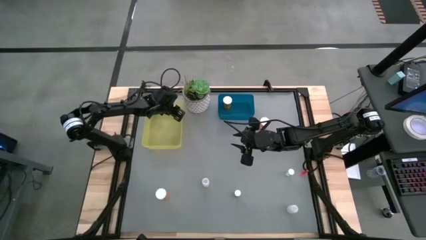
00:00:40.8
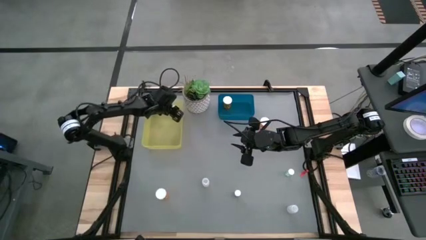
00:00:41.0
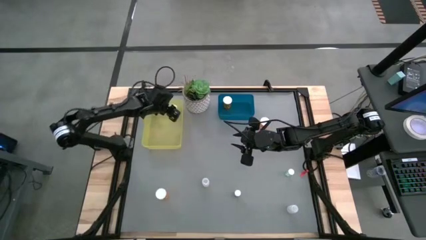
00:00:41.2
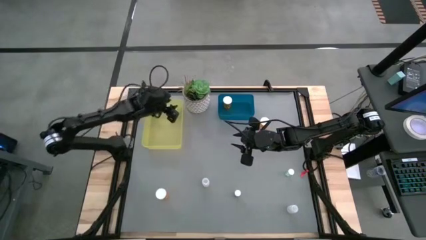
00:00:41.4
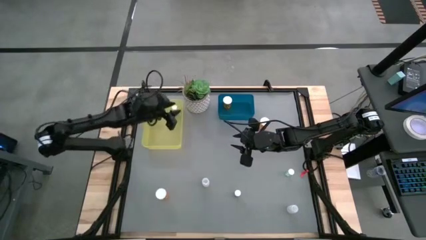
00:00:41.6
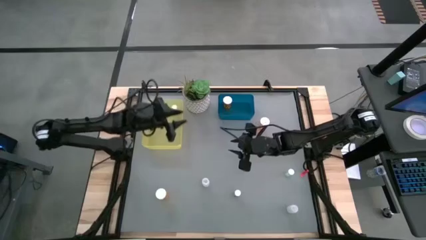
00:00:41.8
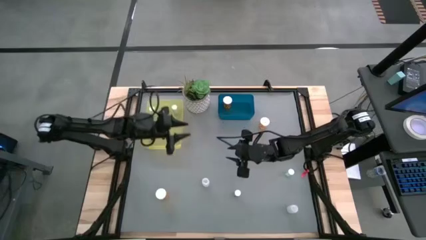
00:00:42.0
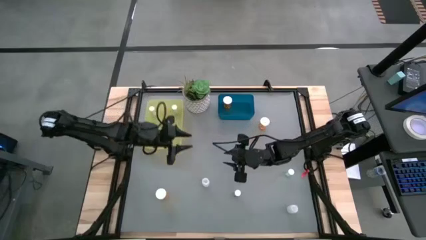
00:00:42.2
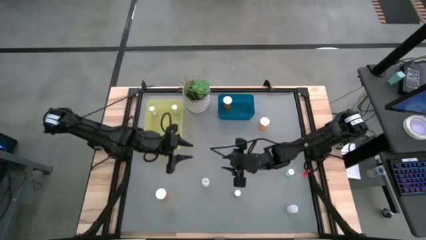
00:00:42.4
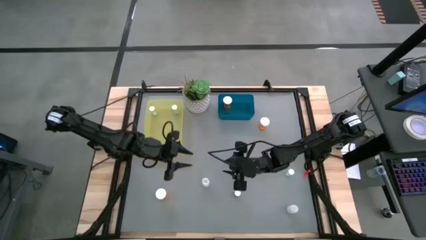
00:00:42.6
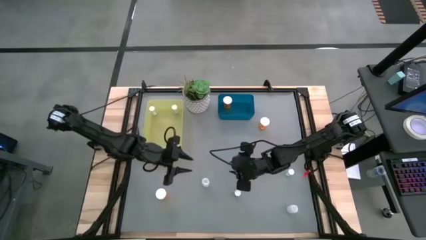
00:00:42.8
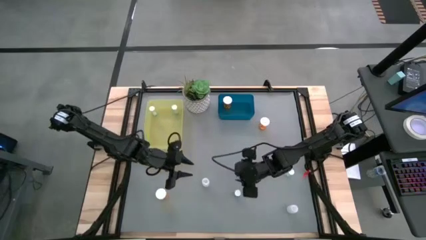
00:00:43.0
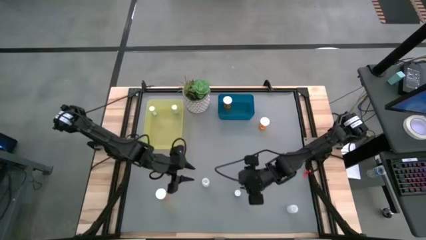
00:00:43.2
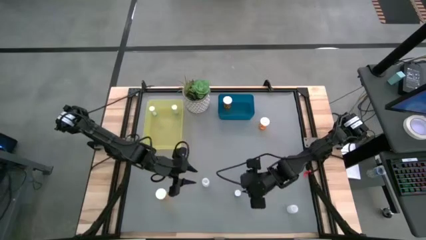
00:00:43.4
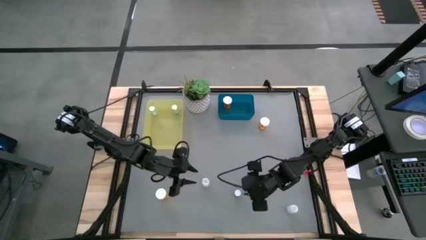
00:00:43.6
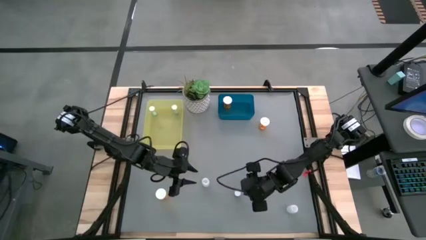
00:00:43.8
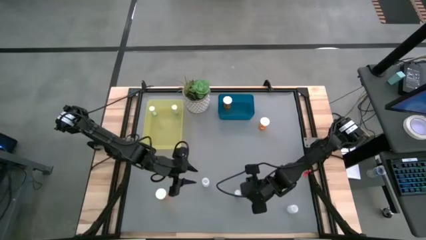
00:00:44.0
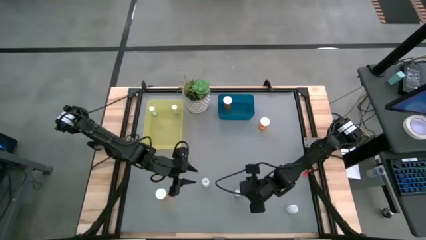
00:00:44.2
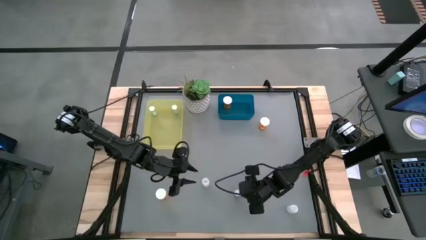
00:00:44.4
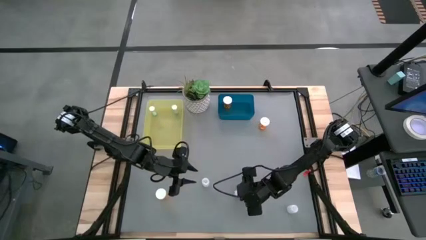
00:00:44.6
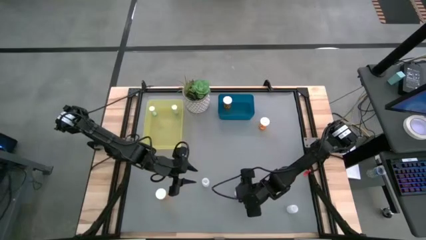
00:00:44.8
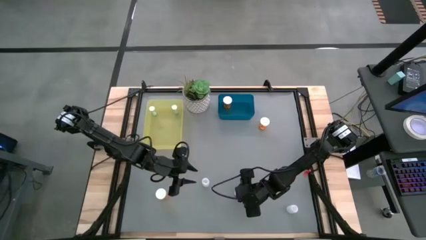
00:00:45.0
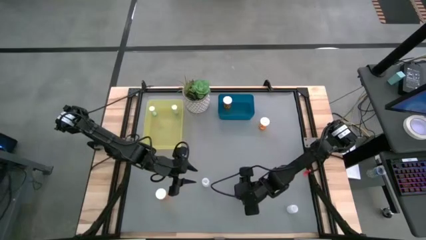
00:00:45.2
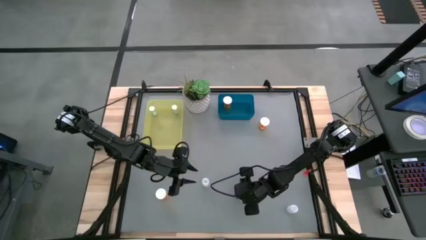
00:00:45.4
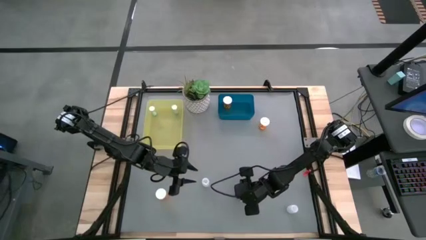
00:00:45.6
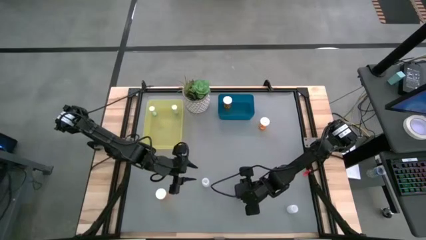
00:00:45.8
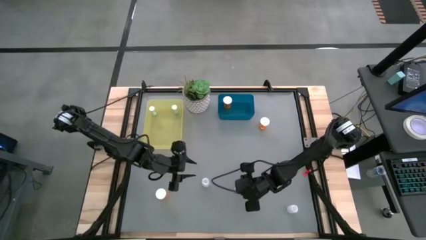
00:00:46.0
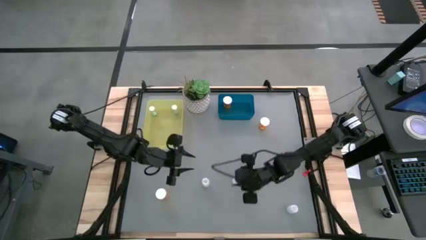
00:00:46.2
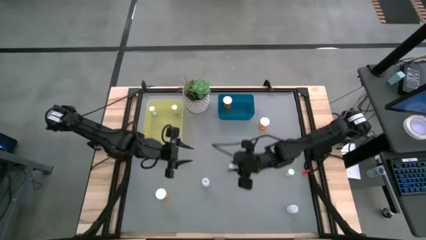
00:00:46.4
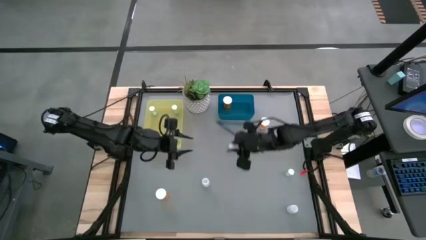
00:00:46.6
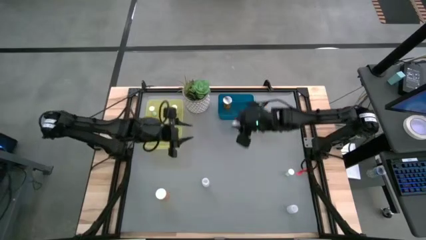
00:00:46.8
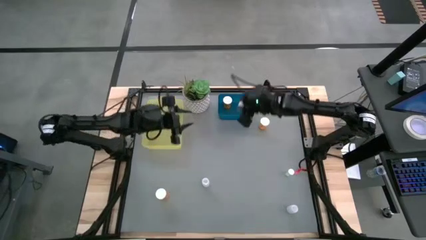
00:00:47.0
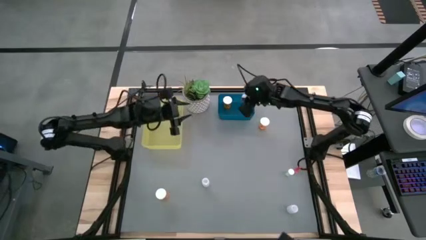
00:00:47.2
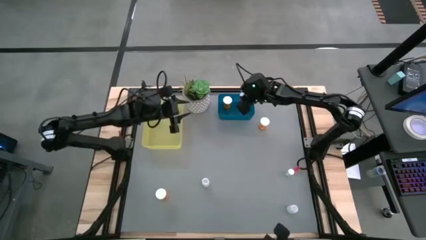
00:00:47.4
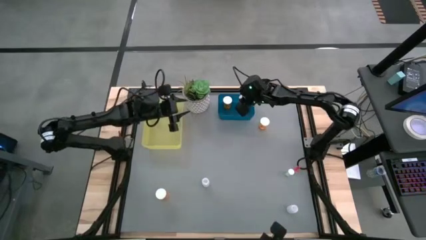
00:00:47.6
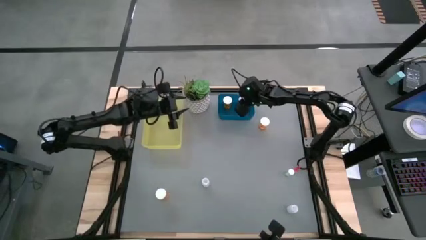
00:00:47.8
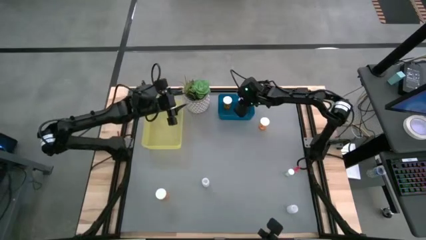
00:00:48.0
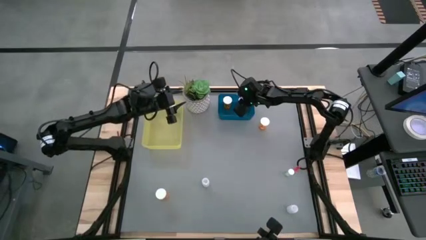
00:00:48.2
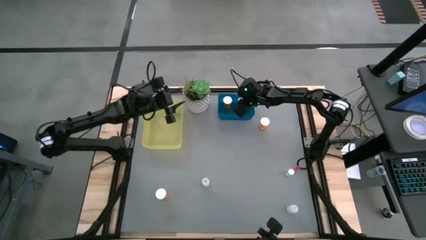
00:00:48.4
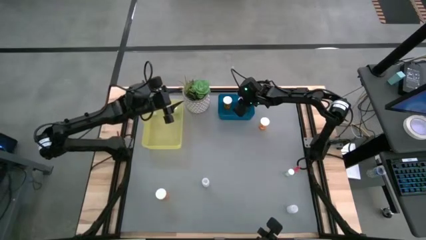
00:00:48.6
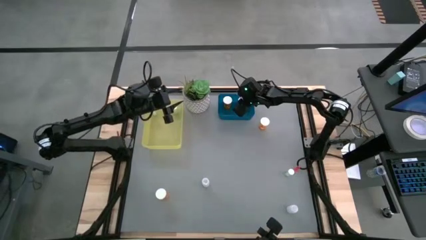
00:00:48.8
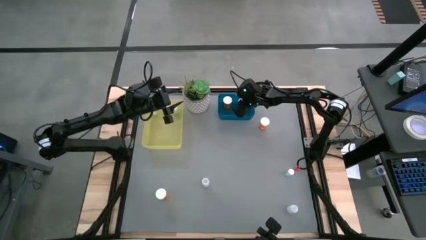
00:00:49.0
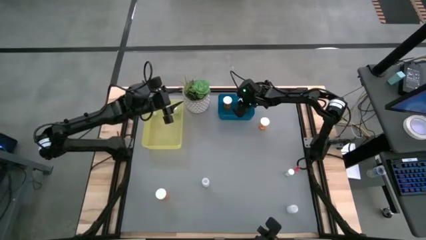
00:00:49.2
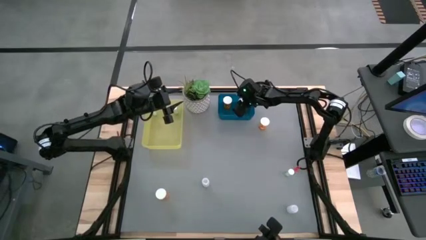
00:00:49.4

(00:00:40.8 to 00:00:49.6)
Task: Pick and place medicine bottles into bin by pill shape (circle, oval)
Put the blue capsule bottle into the blue bin

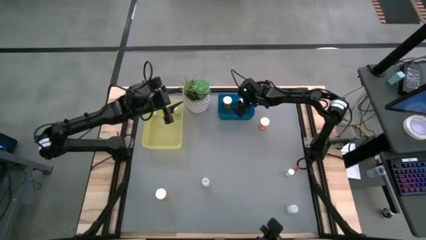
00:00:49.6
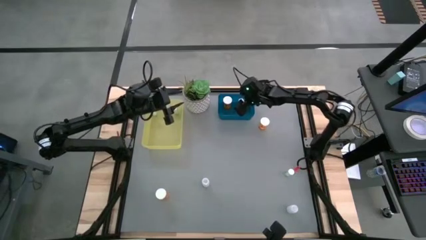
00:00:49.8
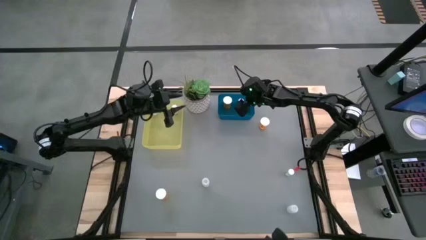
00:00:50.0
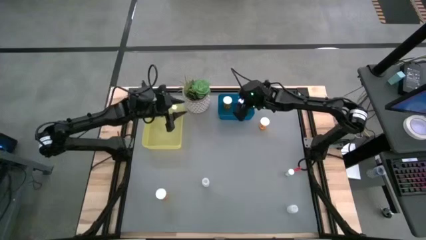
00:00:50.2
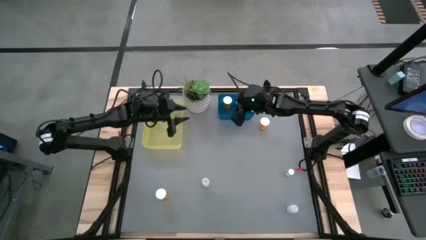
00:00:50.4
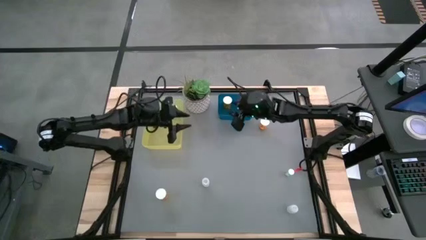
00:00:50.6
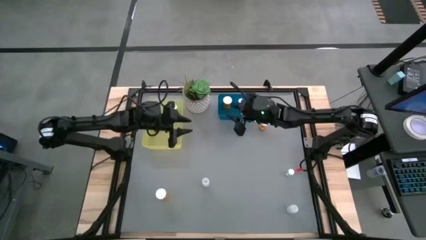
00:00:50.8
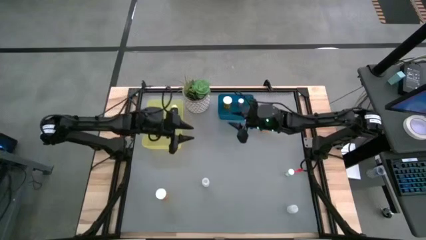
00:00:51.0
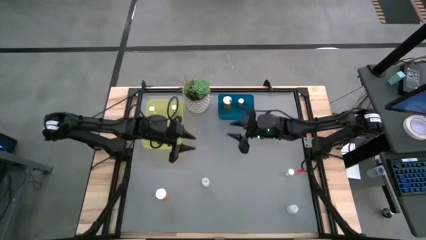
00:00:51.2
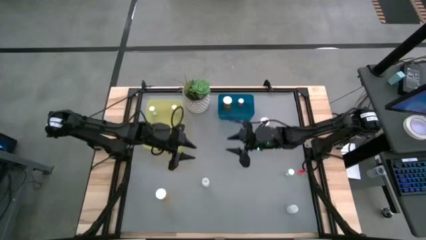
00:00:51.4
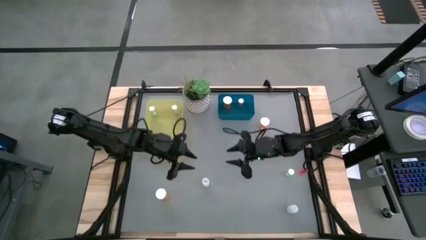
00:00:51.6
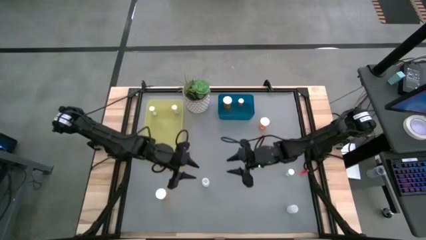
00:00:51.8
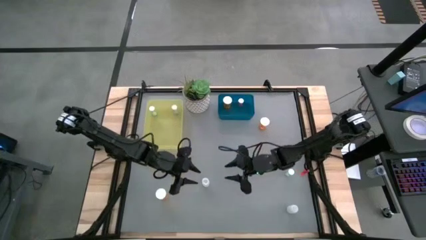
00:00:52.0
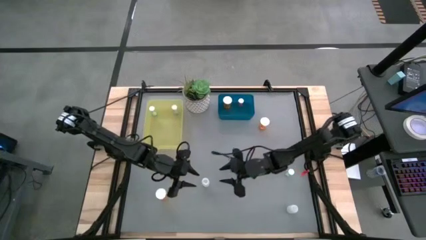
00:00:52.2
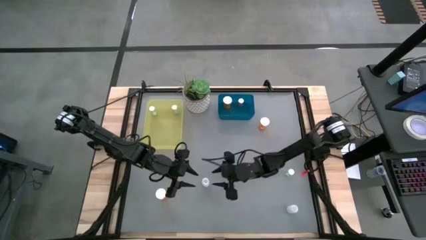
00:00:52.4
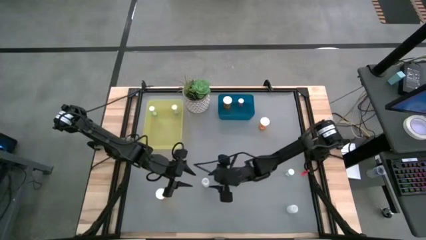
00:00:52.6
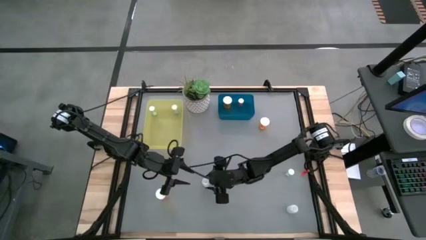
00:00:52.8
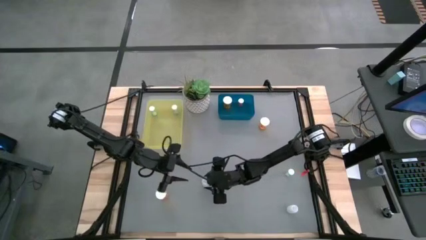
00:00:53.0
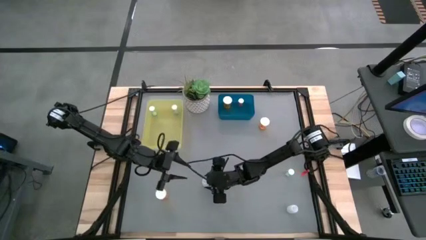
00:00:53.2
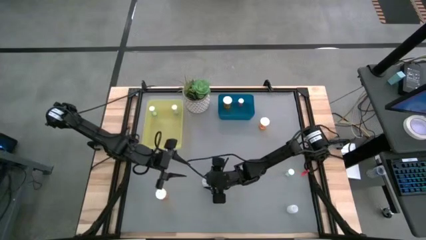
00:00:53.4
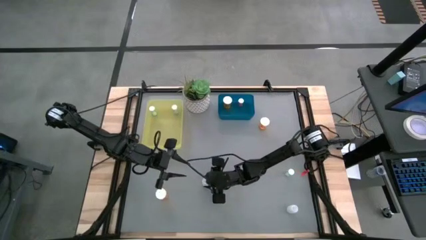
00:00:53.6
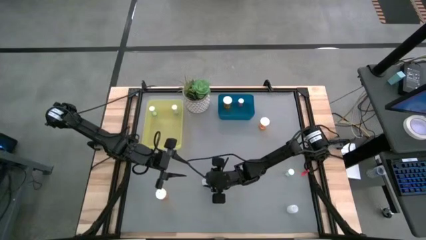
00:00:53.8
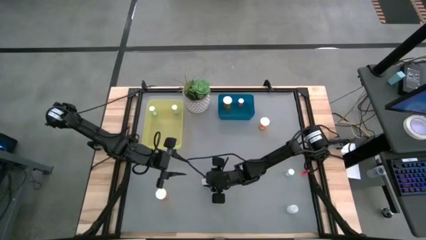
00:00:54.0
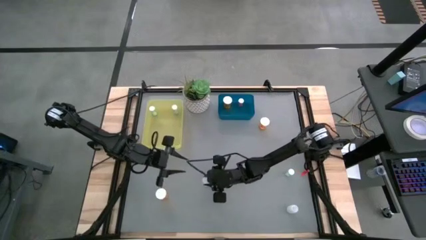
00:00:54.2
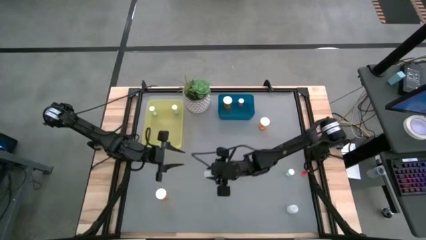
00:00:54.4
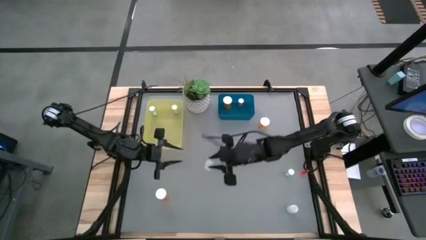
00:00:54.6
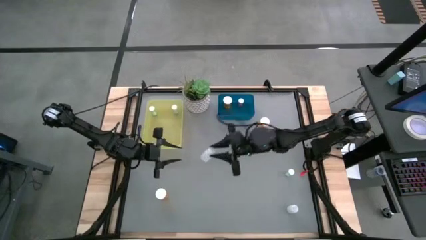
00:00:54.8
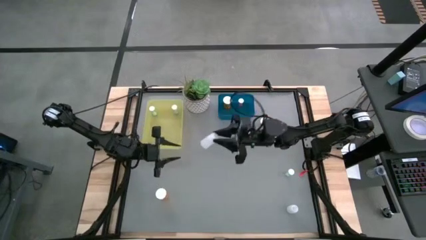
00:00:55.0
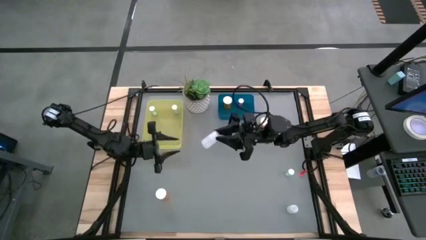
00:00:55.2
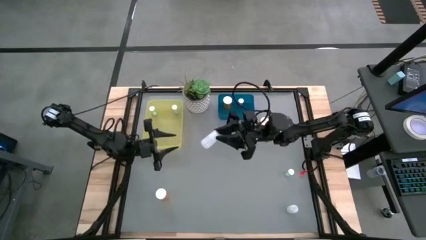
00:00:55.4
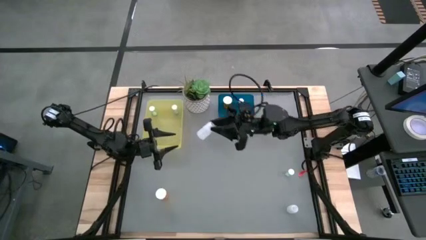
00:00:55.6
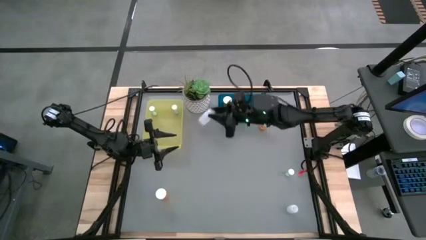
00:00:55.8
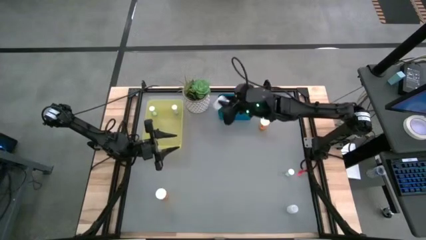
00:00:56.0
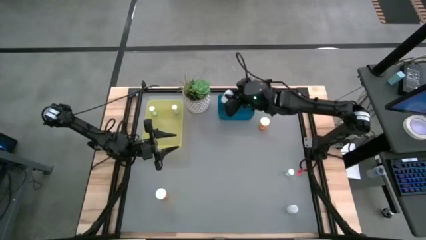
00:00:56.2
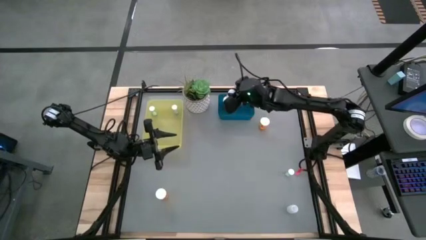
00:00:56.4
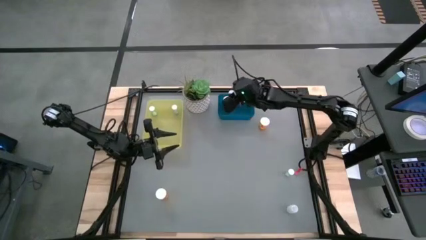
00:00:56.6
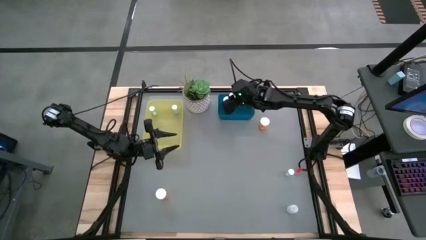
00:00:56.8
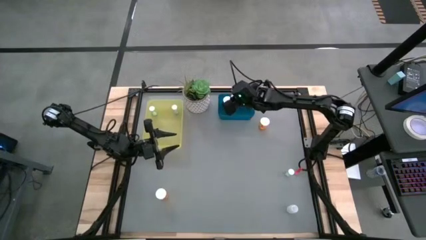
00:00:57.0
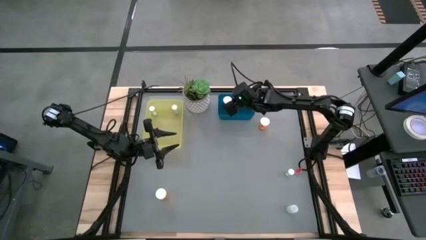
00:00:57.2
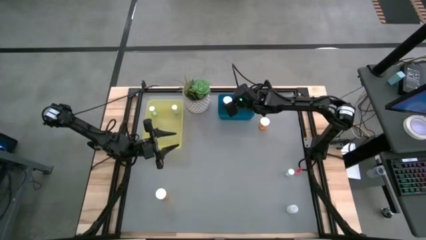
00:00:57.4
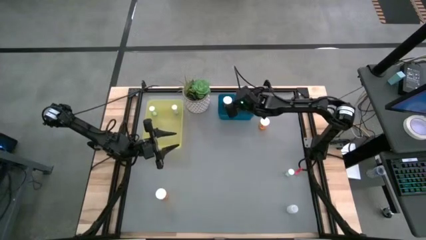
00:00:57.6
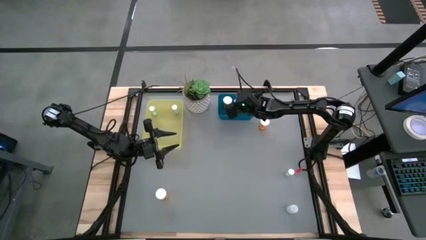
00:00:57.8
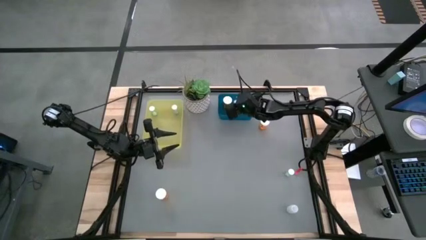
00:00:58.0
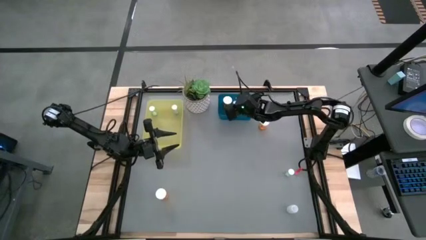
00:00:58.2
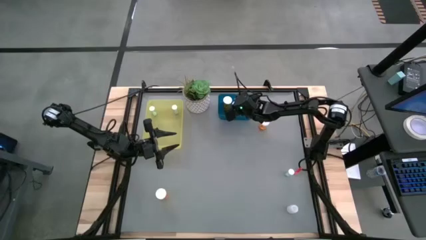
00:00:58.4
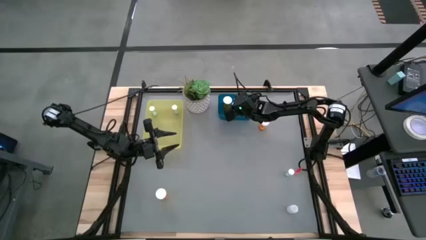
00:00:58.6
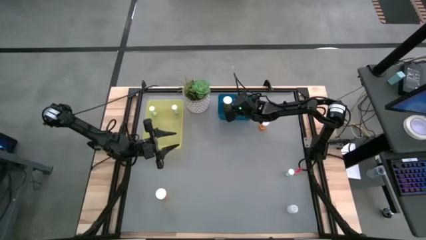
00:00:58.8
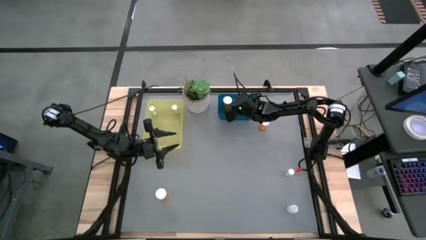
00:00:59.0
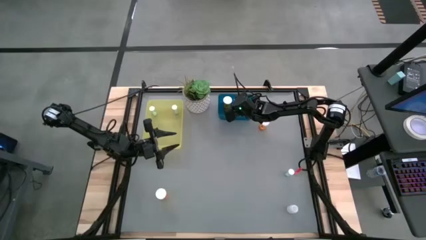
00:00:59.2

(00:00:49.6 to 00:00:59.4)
Put the white capsule bottle into the blue bin
